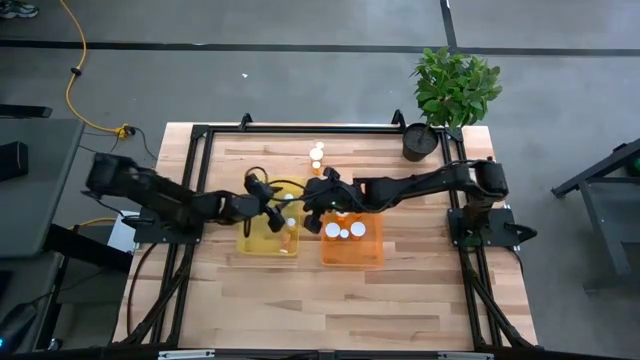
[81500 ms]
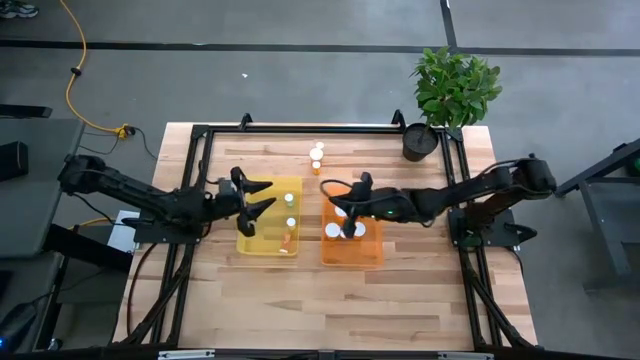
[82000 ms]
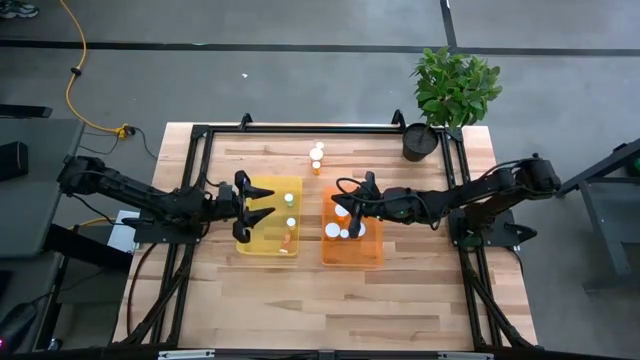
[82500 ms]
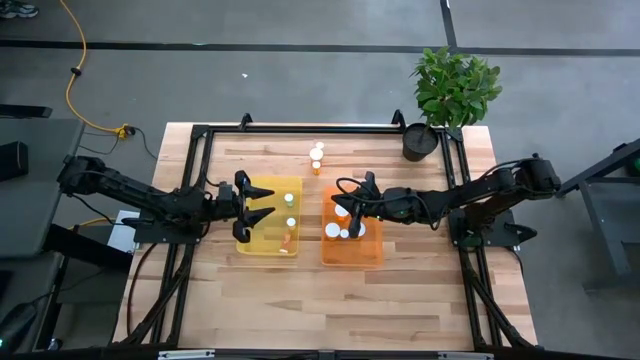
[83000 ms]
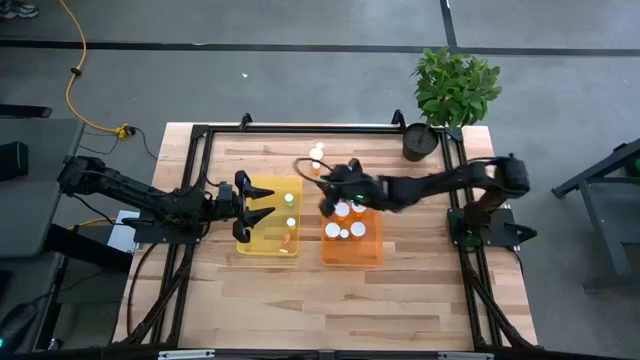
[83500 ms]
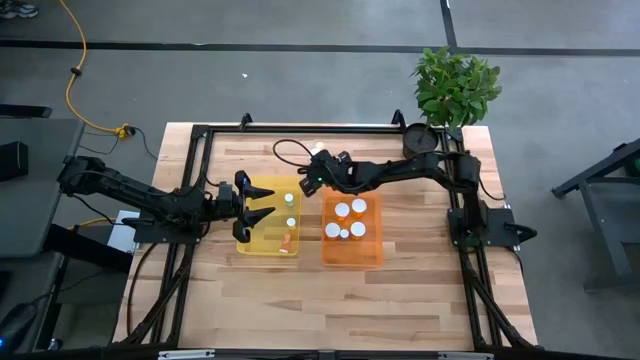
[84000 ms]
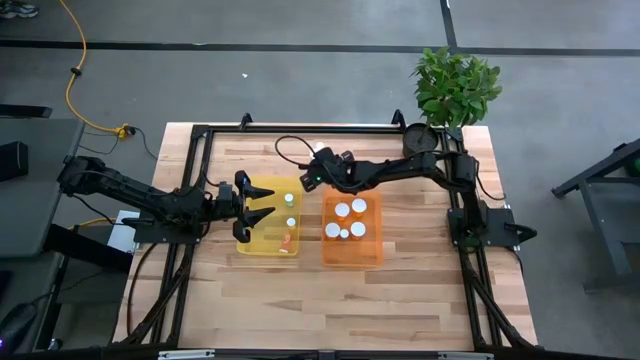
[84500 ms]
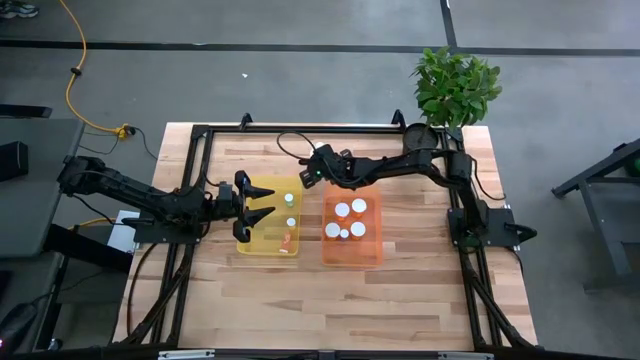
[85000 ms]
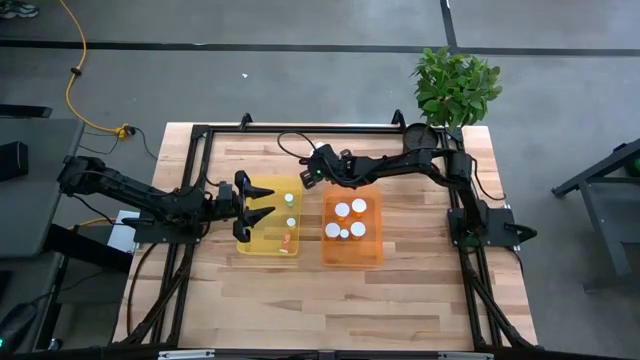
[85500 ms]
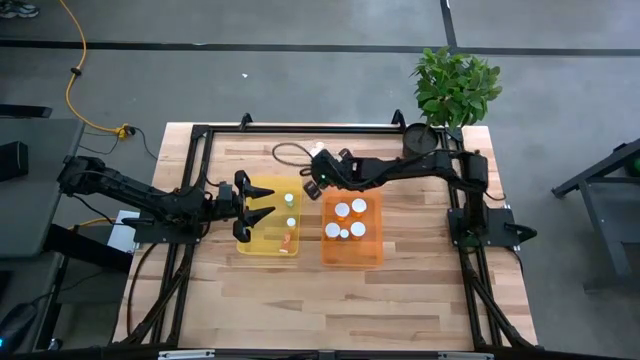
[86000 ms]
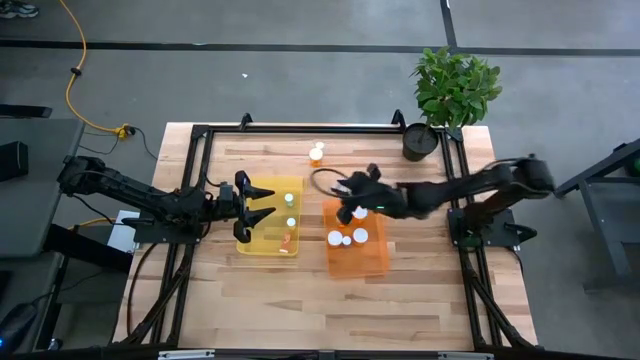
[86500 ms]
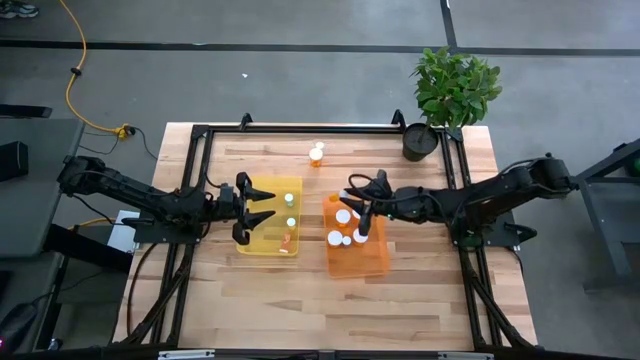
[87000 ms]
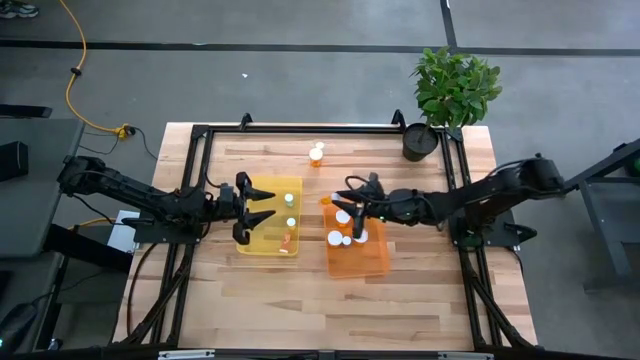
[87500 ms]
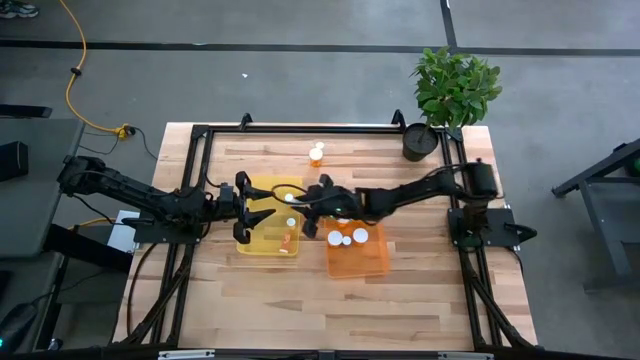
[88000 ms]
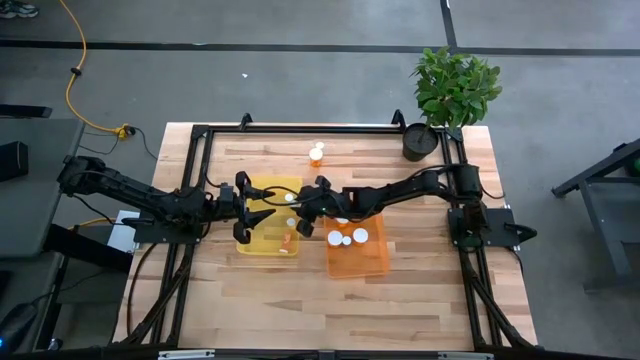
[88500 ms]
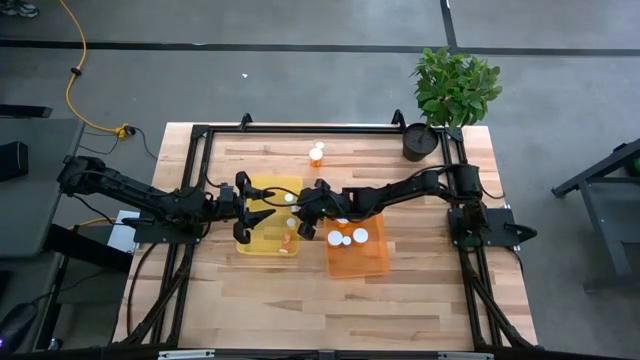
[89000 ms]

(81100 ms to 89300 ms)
Task: Pick and place medicine bottles into bin by pill shape (circle, oval)
Put the orange bottle pill into the yellow bin

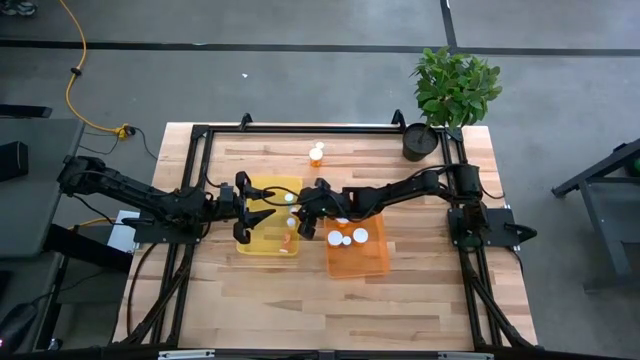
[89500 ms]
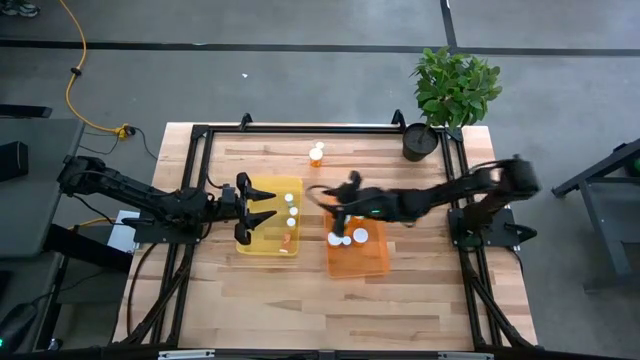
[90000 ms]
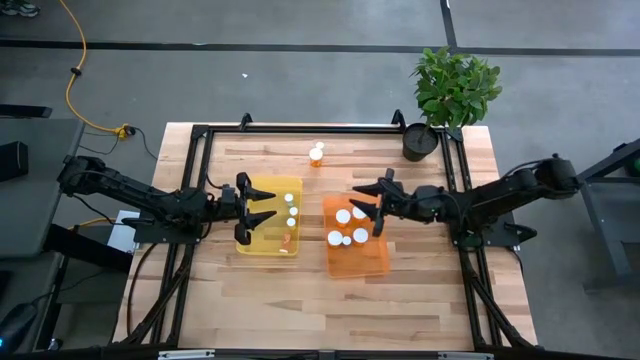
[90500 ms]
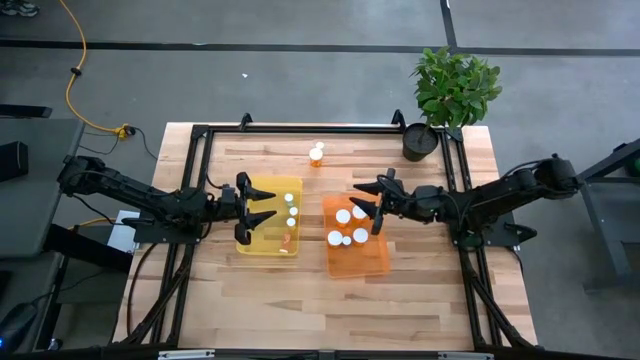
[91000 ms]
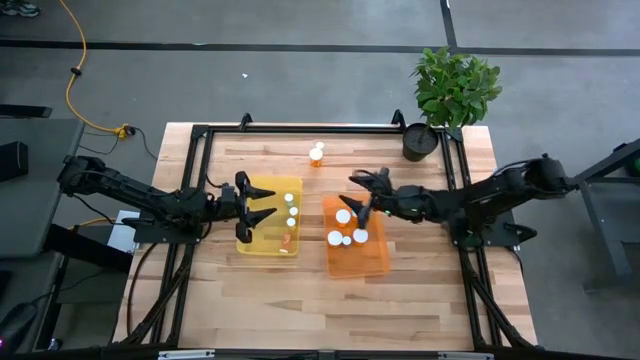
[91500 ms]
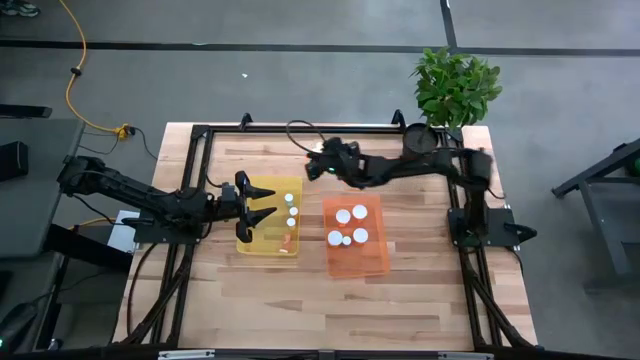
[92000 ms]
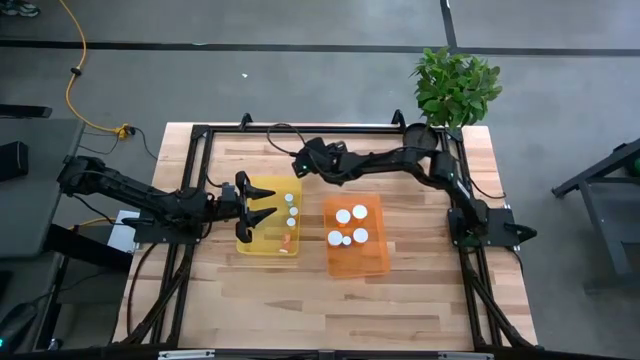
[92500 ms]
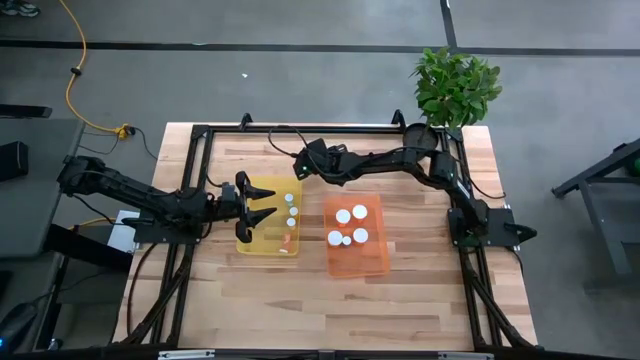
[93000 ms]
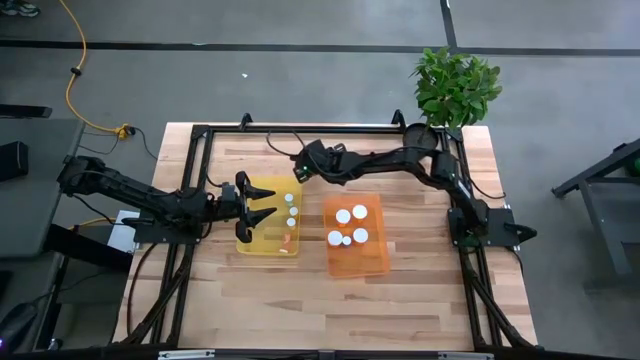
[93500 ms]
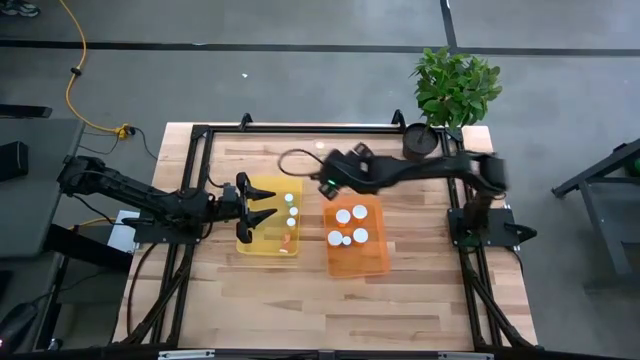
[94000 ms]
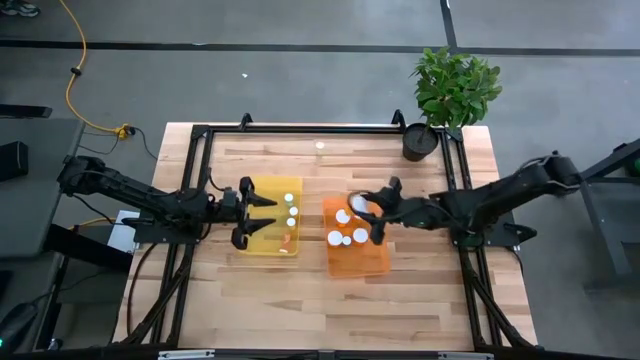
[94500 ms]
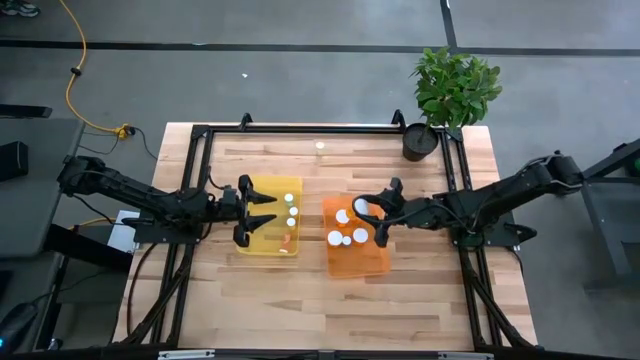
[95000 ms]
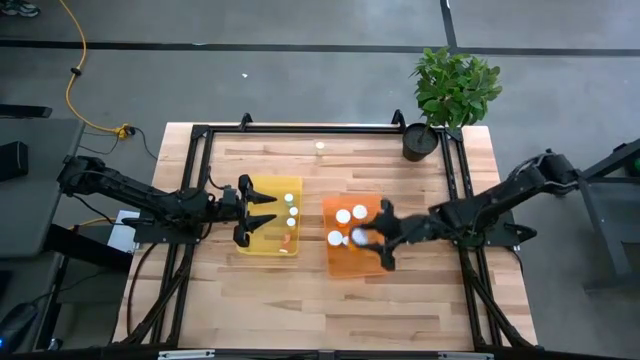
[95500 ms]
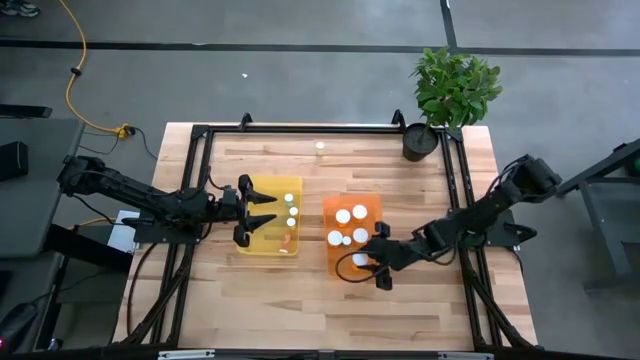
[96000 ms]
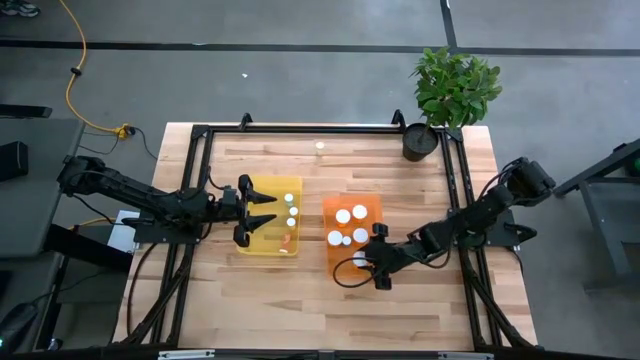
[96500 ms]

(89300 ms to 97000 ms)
Put the Orange bottle pill into the yellow bin

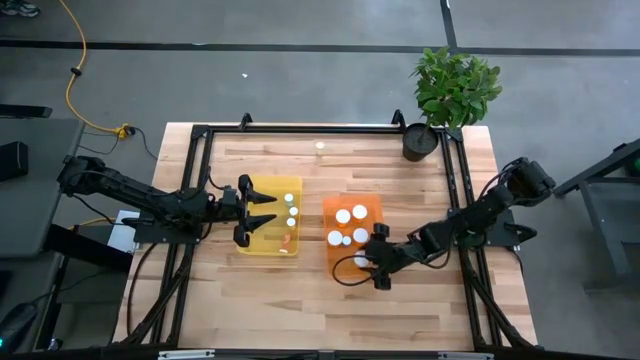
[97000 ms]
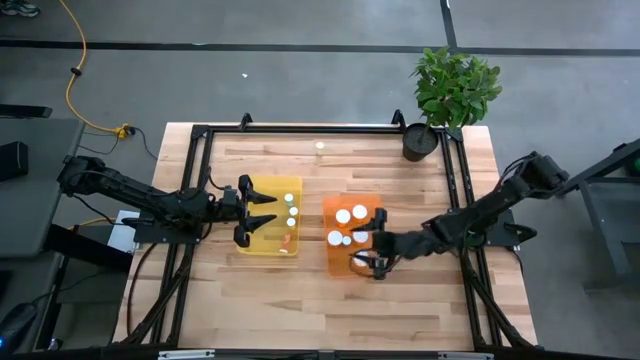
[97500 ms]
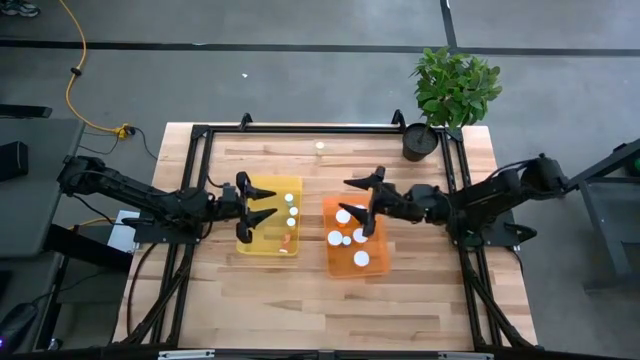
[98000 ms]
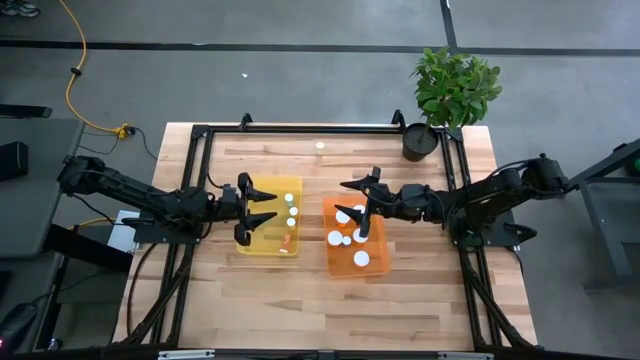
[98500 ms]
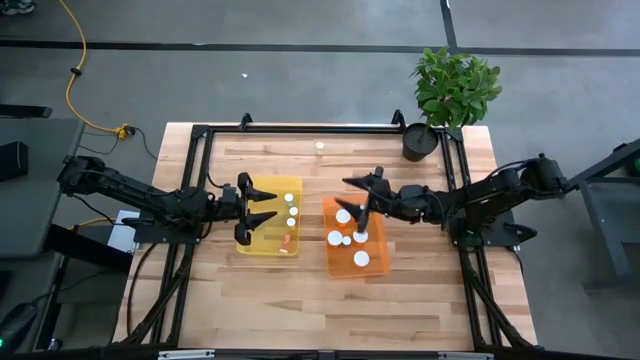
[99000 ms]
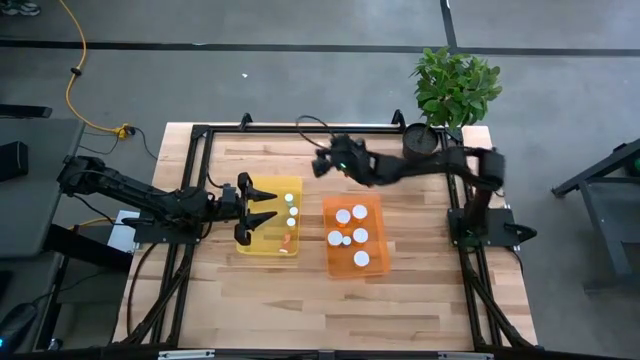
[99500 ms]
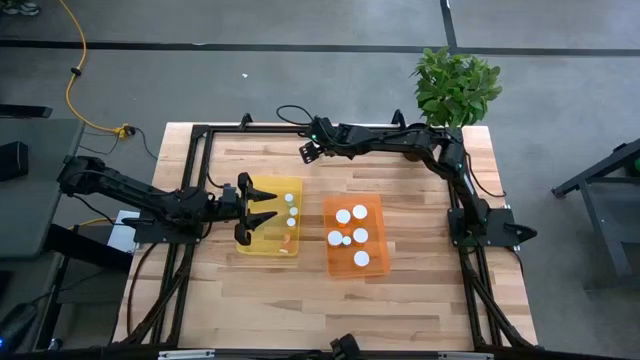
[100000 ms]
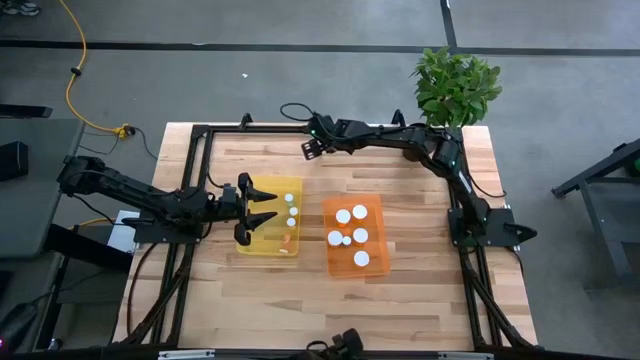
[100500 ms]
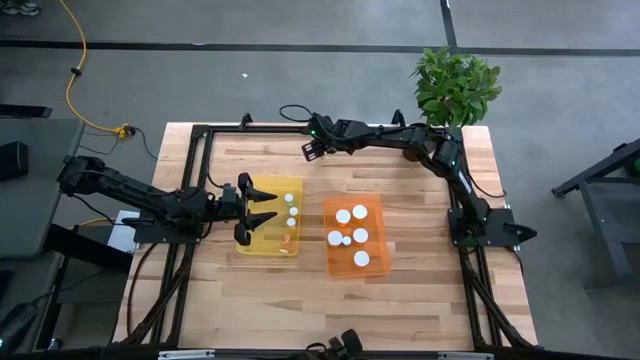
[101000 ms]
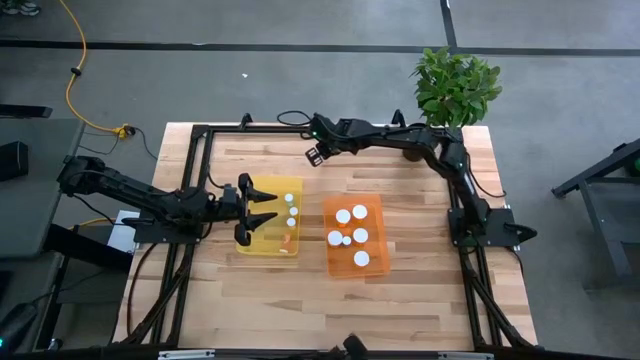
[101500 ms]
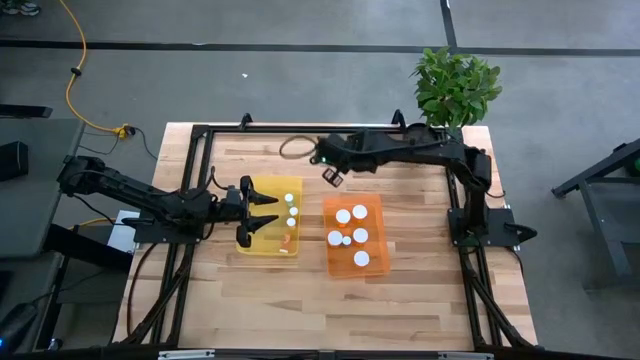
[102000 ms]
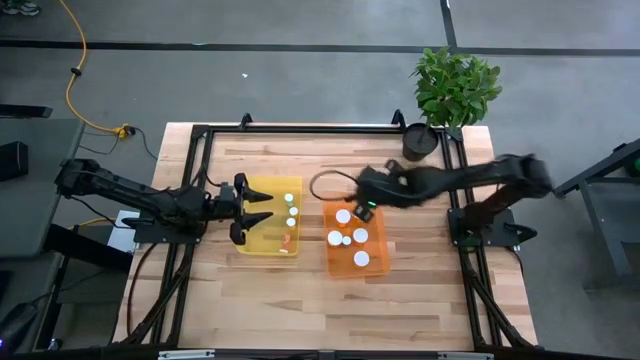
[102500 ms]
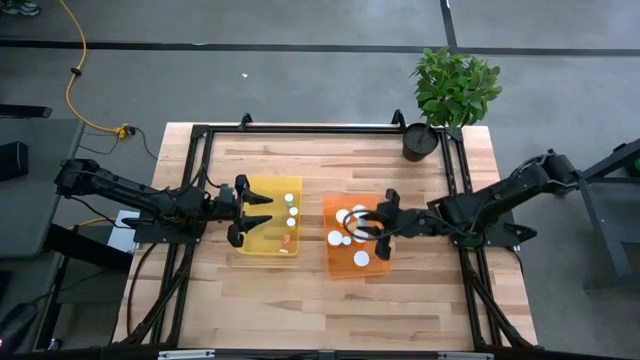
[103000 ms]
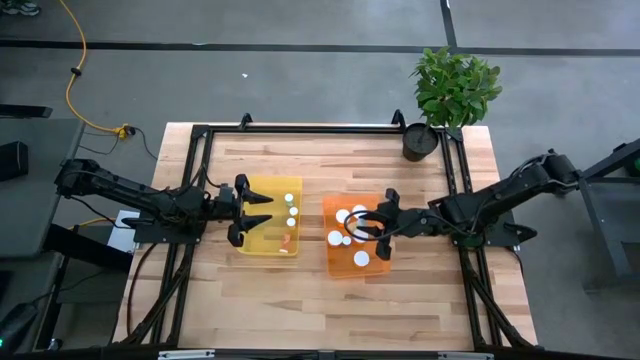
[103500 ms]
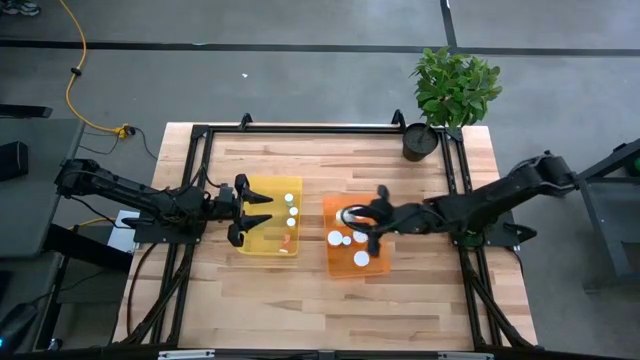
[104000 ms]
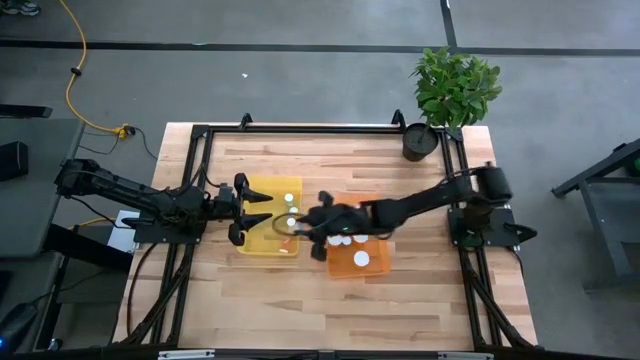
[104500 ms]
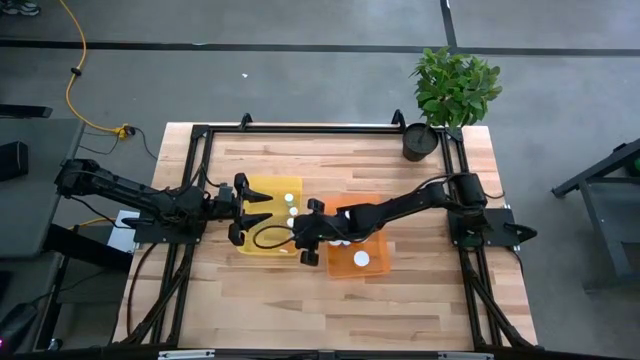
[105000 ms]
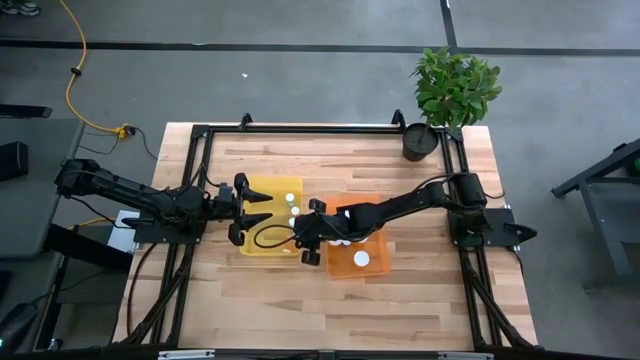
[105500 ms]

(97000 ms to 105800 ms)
Put the orange bottle pill into the orange bin
